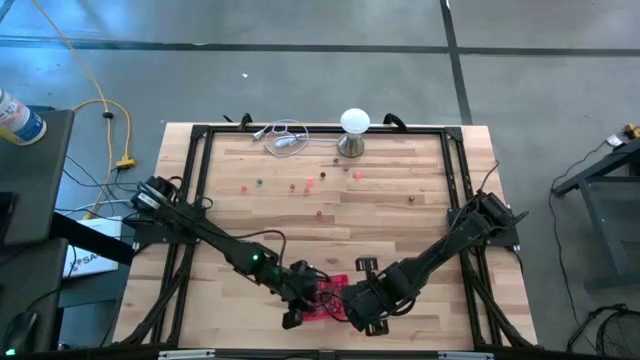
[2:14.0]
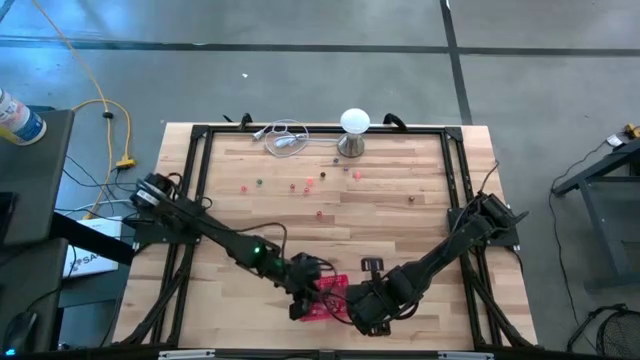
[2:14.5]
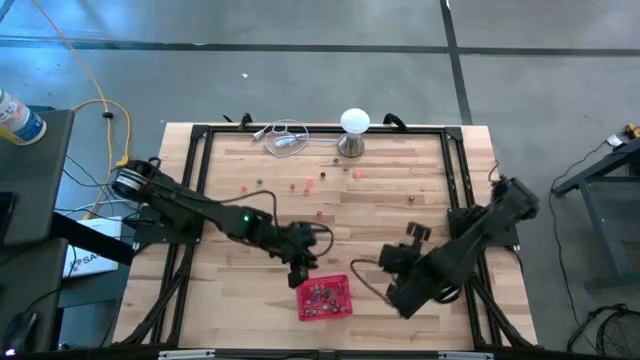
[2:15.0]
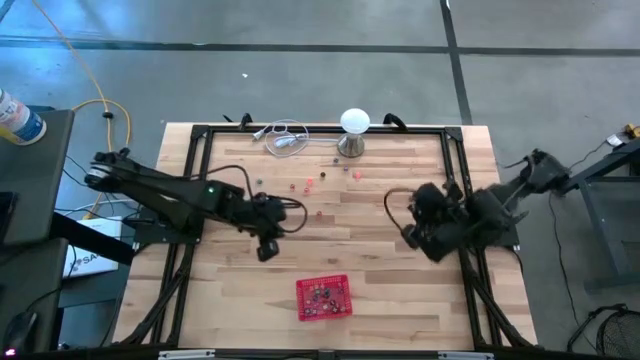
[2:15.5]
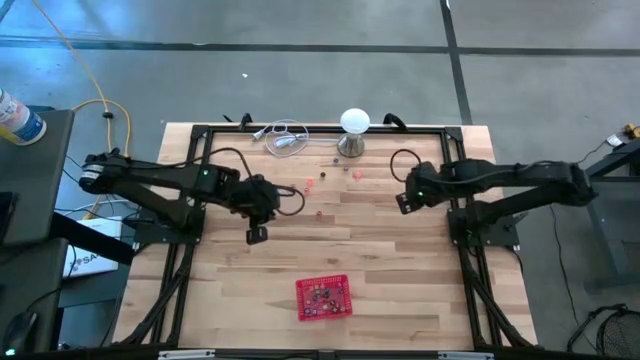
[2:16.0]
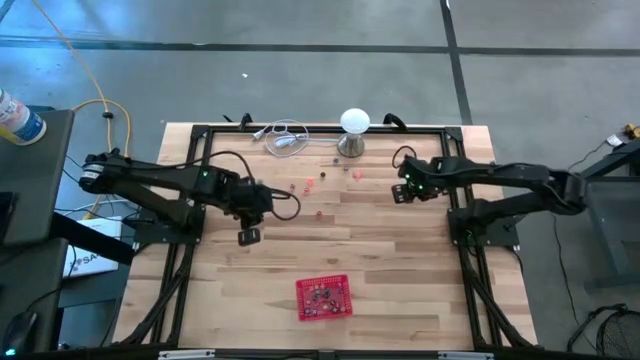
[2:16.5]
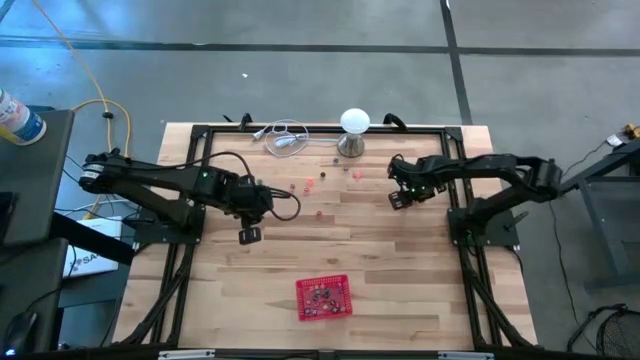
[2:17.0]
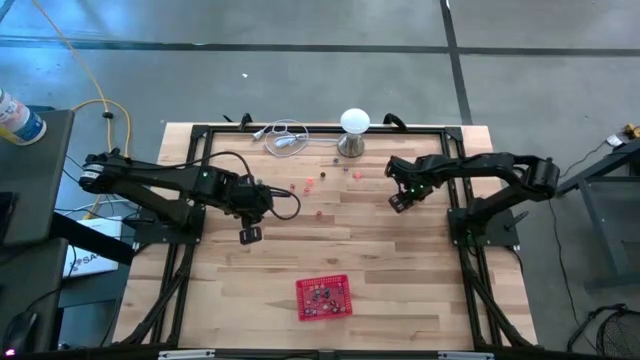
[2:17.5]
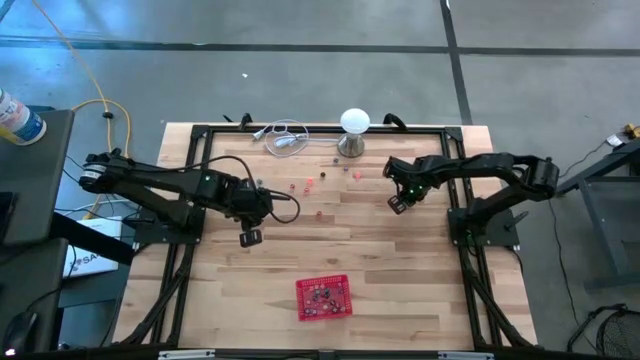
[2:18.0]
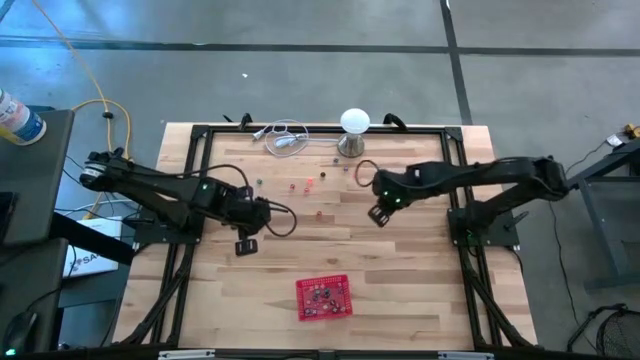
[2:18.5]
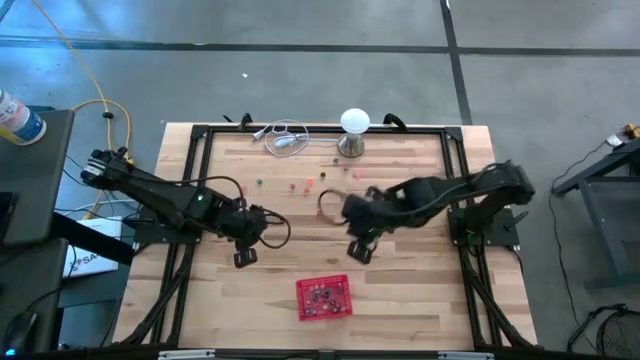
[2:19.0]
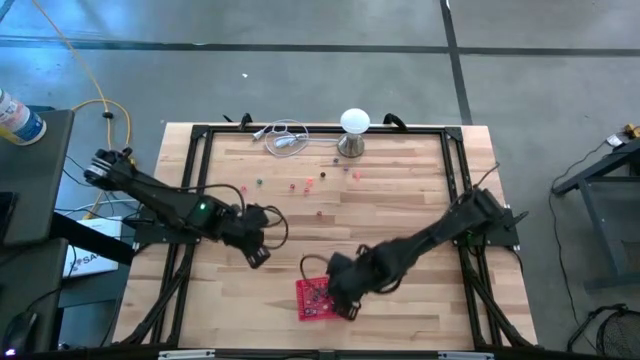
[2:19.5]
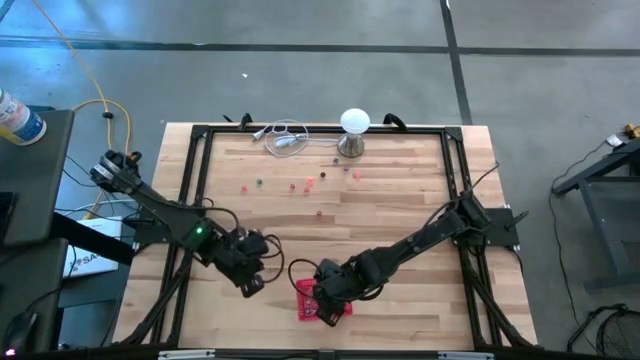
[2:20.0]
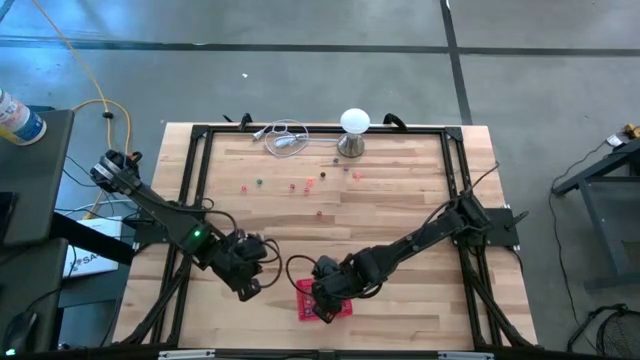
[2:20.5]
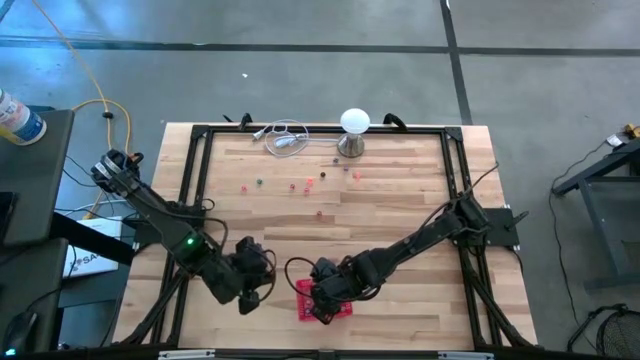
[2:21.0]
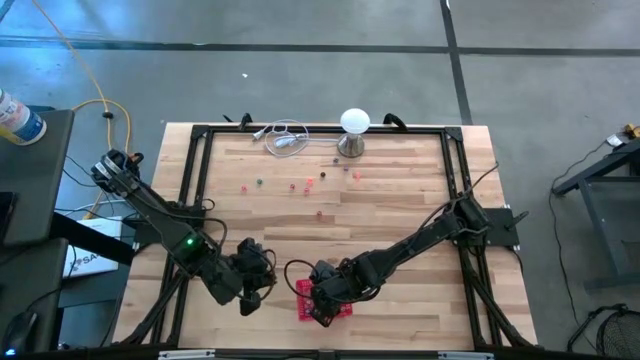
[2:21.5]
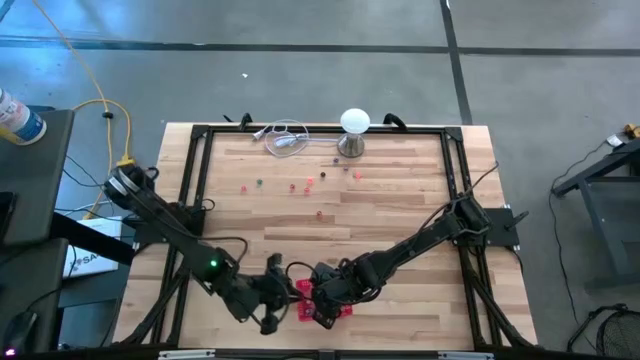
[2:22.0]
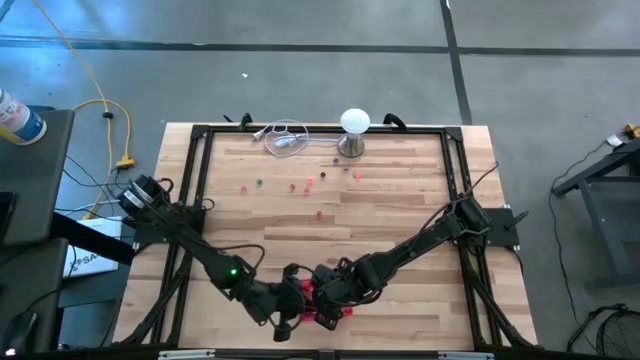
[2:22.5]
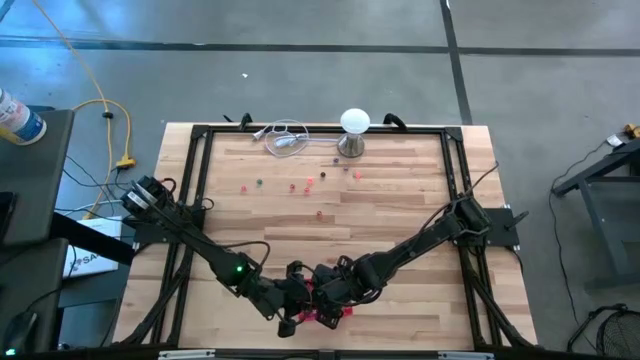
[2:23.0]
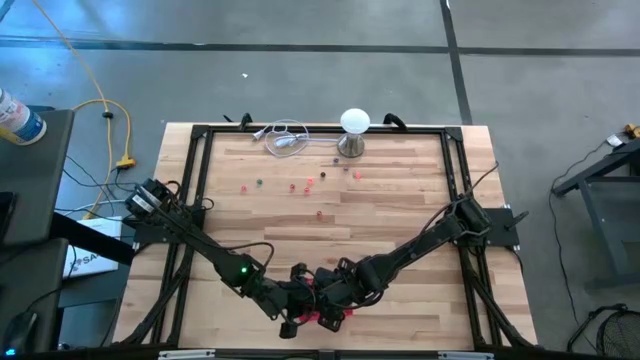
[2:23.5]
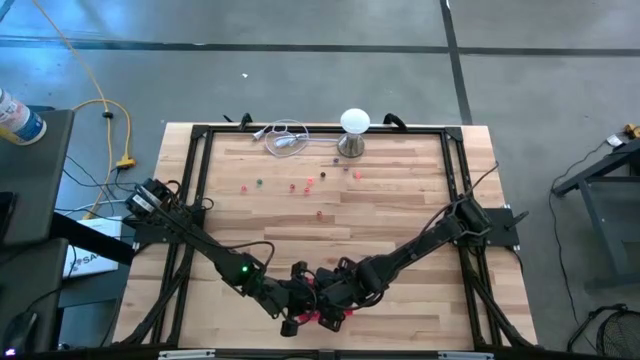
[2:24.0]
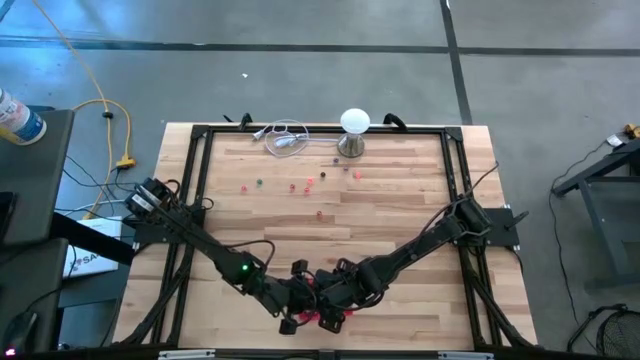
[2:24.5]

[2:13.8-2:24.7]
Task: Pick & Place Dice
Put the black dice into the red bin

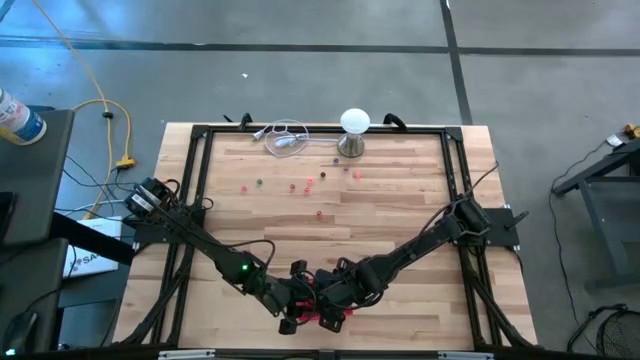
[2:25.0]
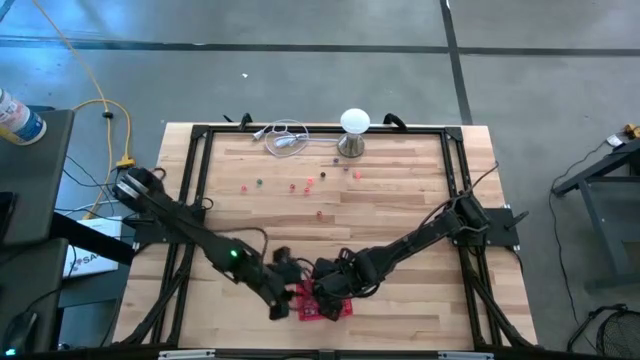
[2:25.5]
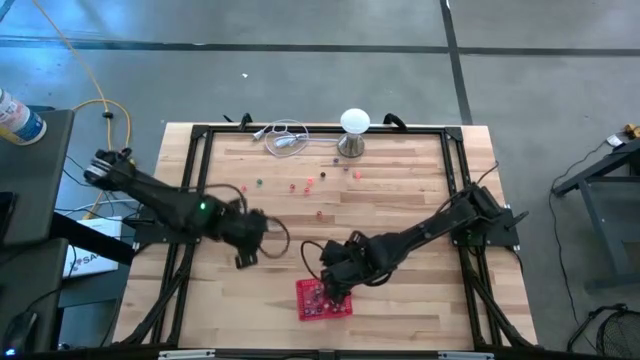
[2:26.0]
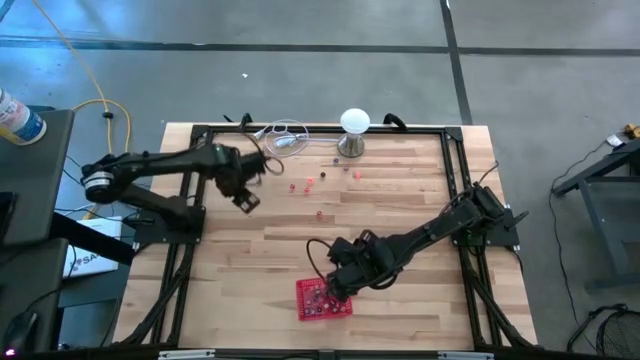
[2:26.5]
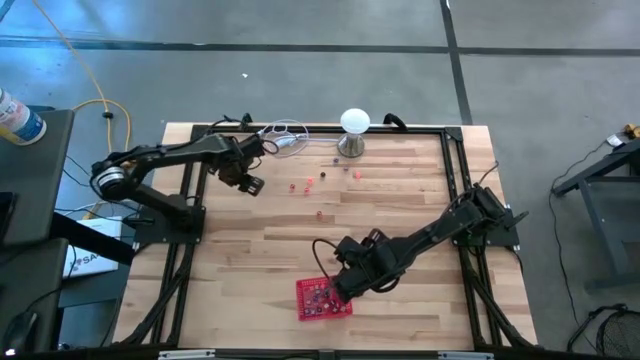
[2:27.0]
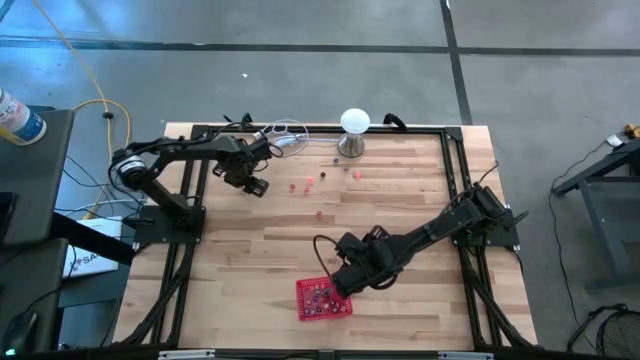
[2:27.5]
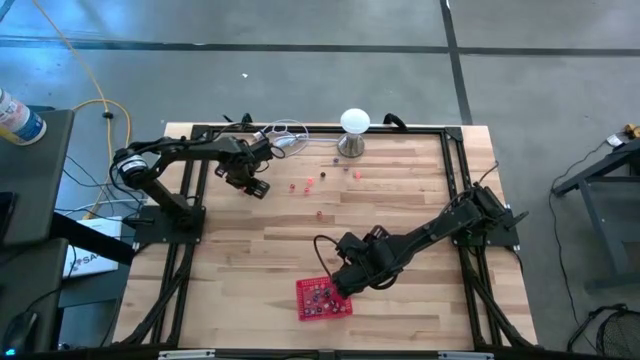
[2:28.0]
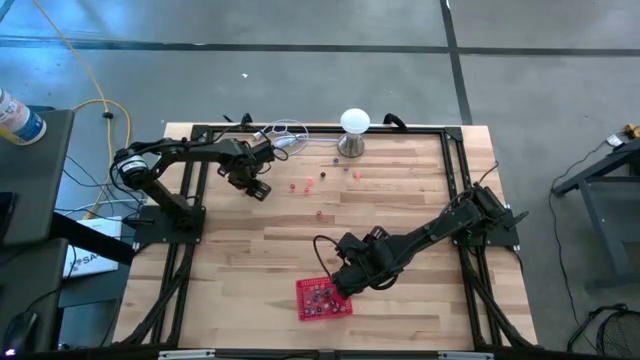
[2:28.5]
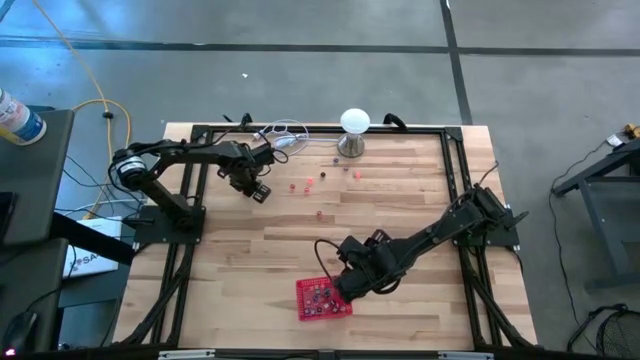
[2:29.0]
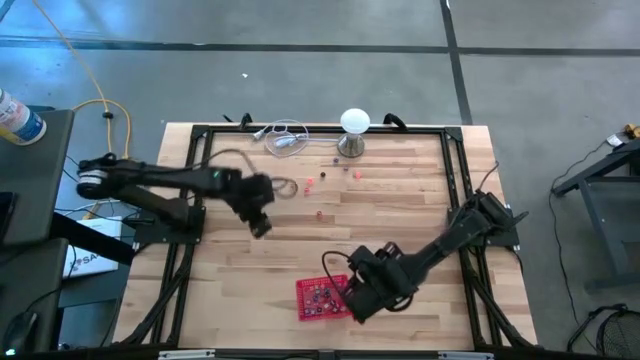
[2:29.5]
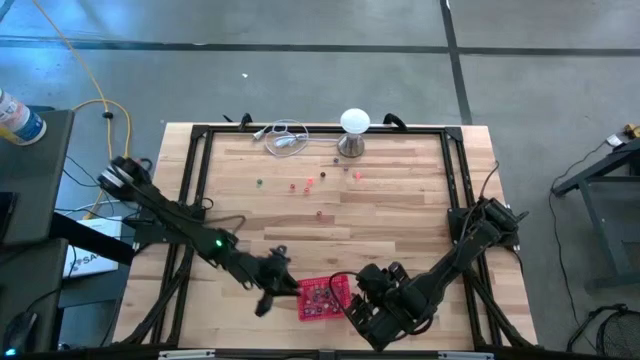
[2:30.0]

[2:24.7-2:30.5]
Put the pink dice into the red bin

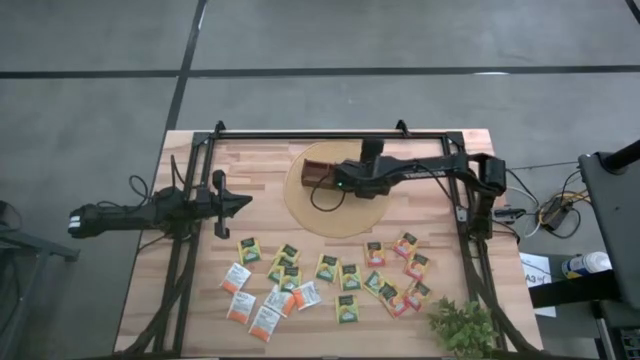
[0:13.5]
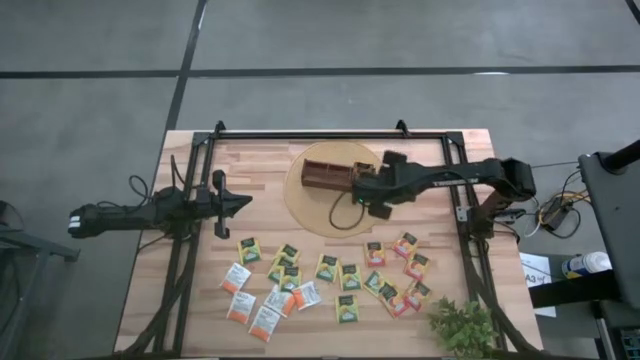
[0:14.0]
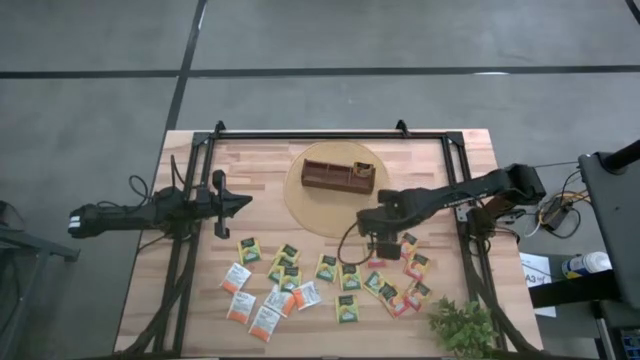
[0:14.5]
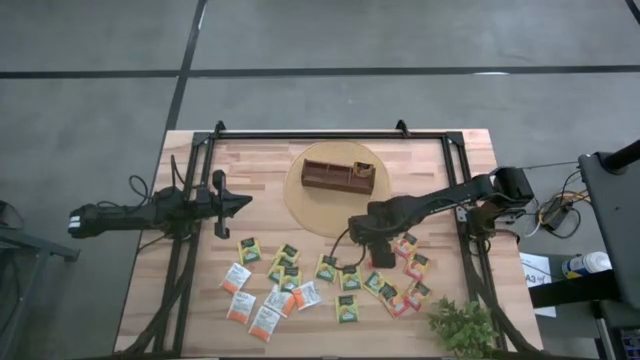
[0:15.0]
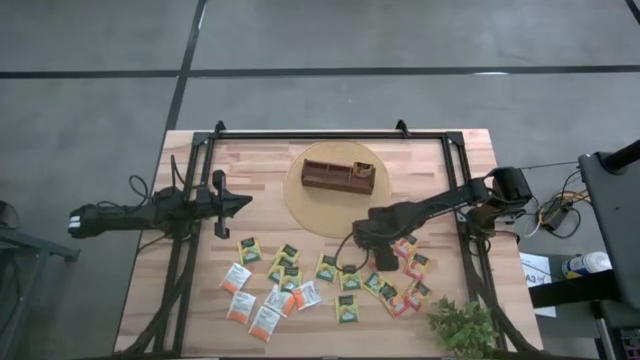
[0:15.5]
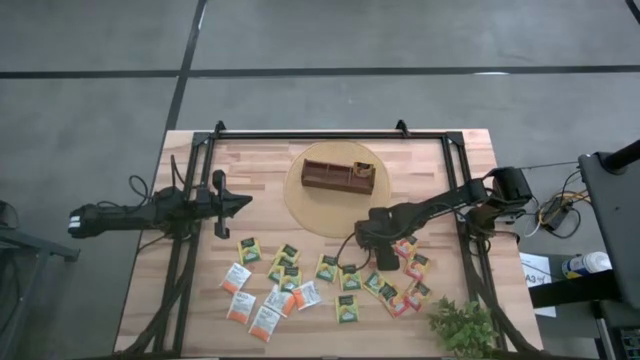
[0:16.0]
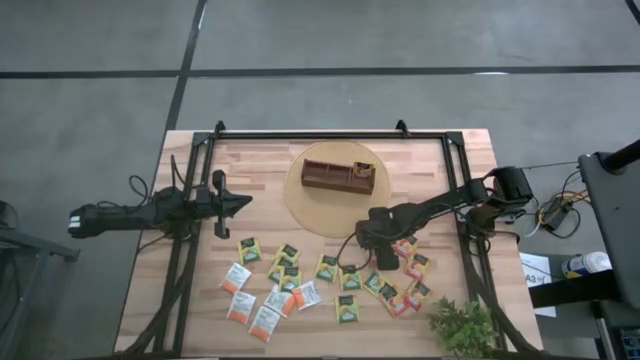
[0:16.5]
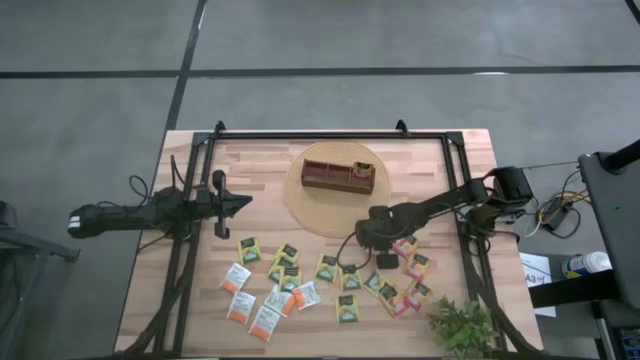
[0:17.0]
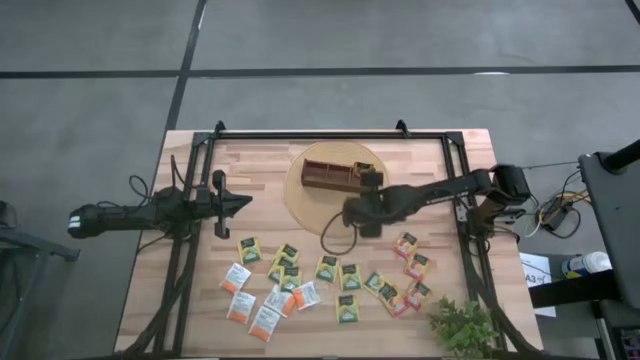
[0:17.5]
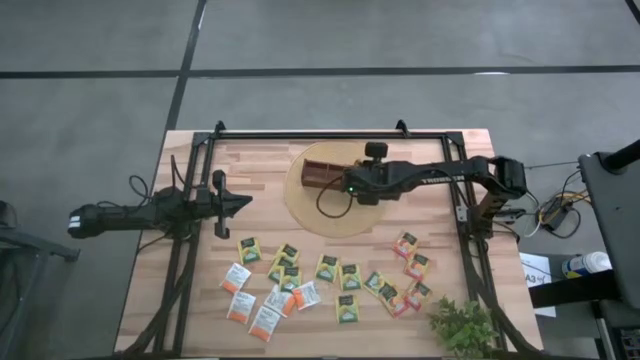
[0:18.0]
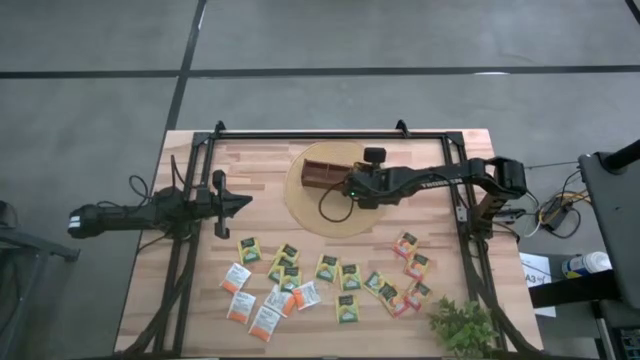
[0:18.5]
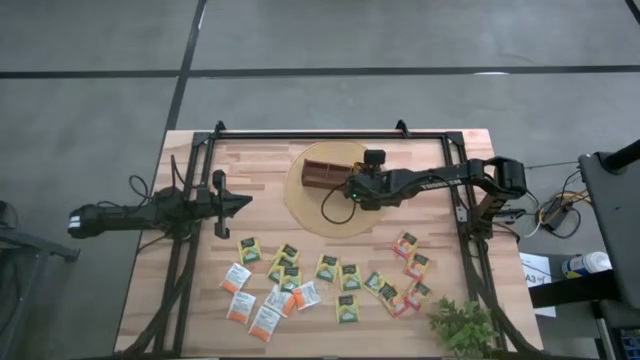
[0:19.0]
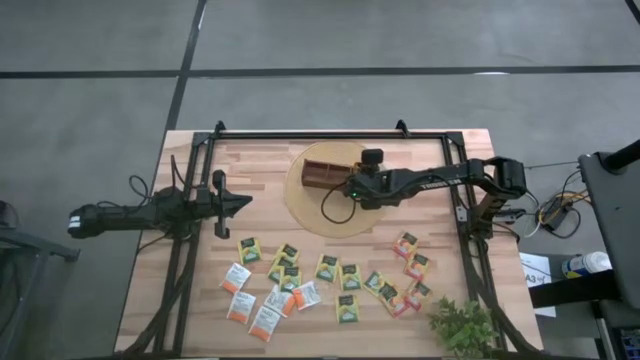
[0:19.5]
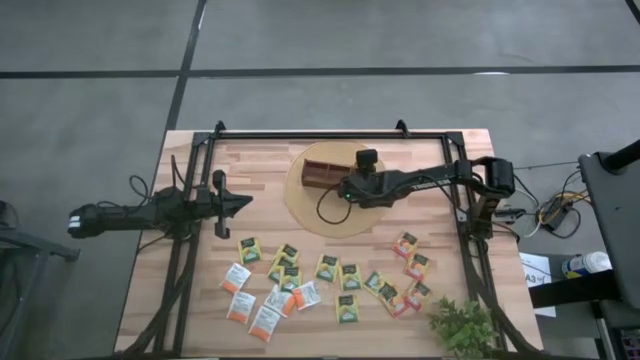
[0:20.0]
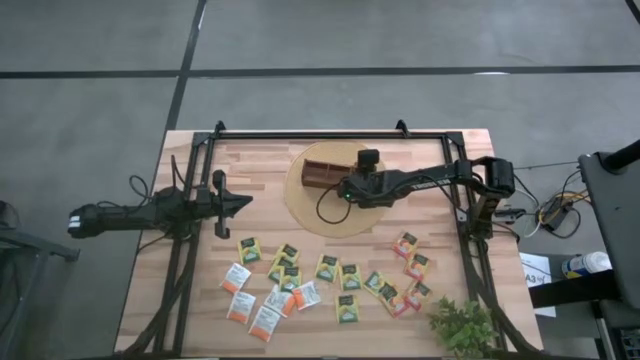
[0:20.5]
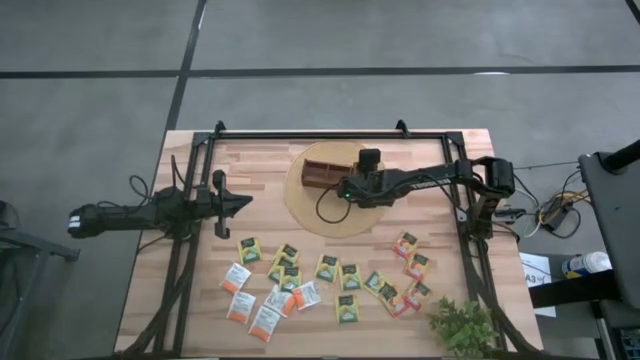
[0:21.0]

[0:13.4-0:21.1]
Task: Pick & Place Tea
Put the orange tea bag into the right section of wooden organizer
